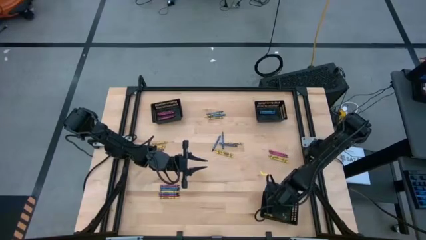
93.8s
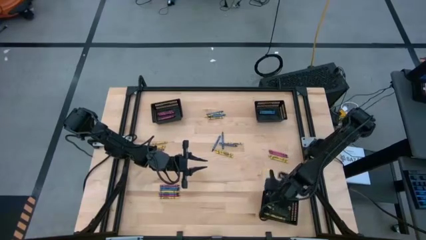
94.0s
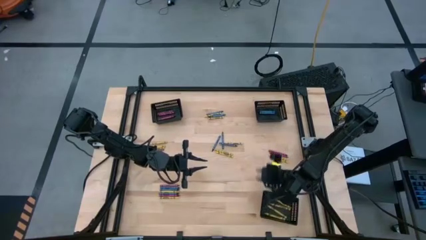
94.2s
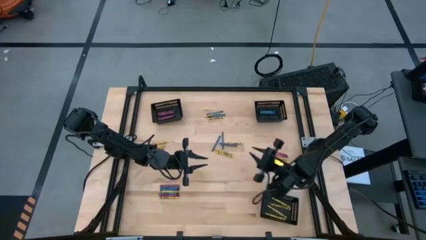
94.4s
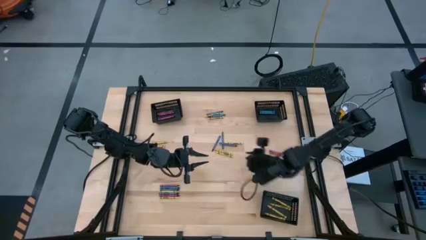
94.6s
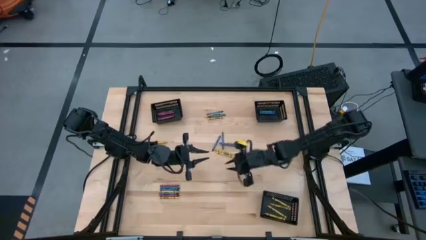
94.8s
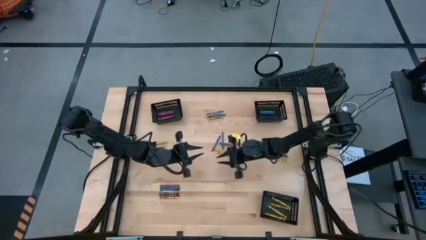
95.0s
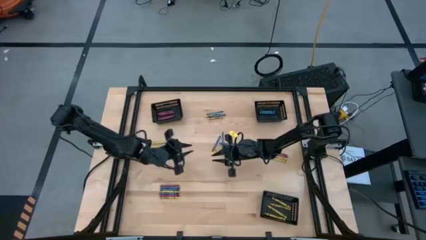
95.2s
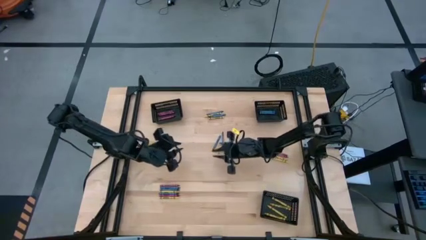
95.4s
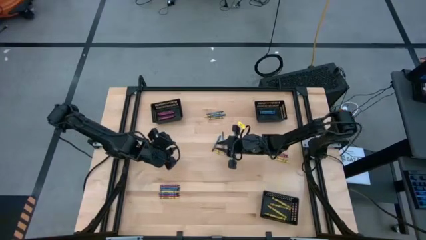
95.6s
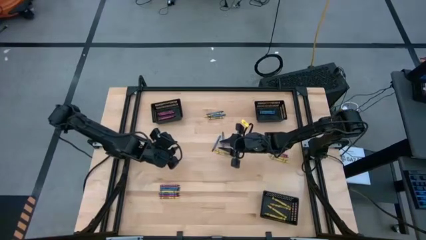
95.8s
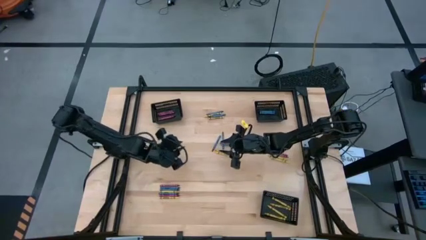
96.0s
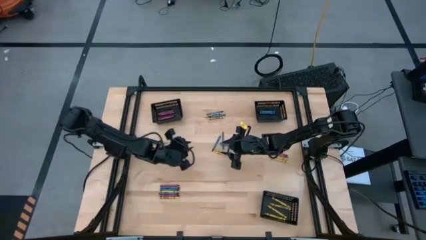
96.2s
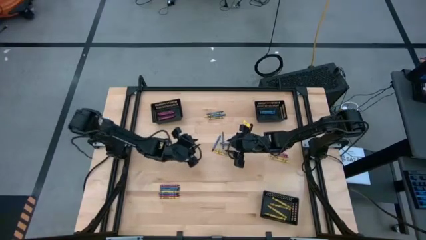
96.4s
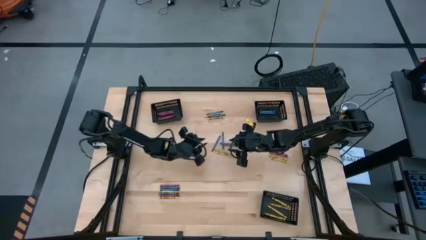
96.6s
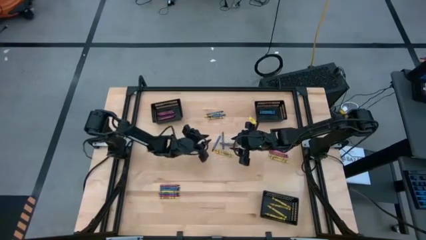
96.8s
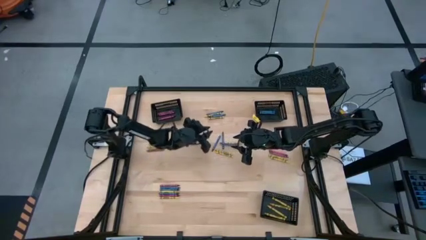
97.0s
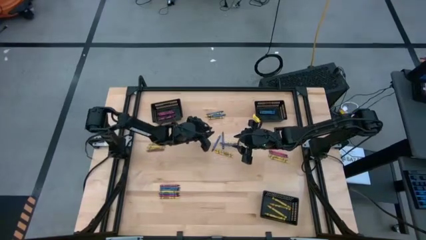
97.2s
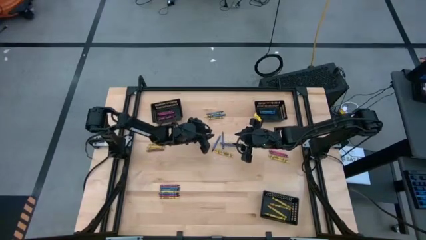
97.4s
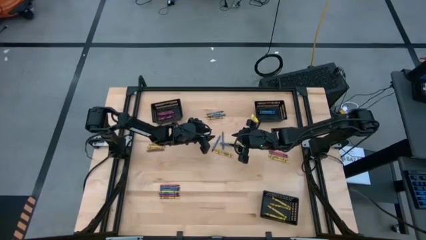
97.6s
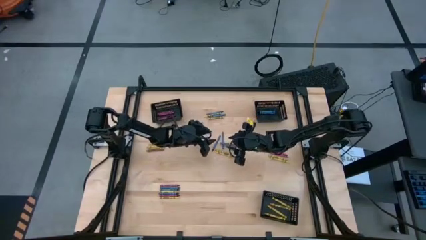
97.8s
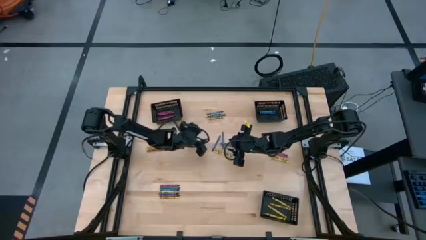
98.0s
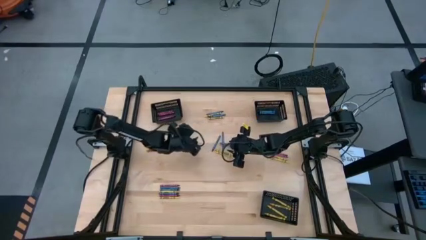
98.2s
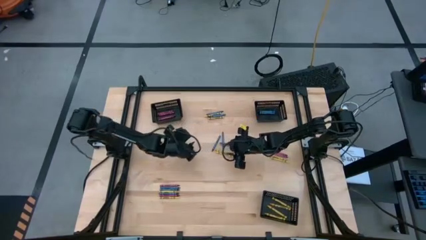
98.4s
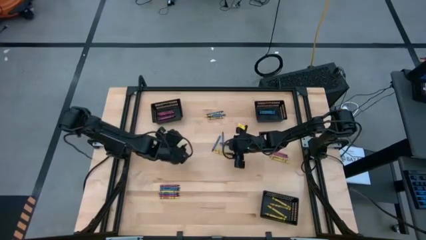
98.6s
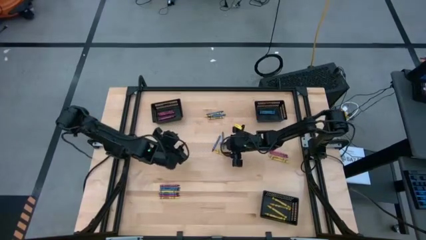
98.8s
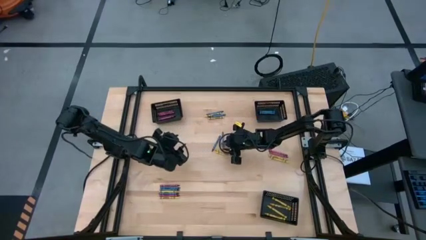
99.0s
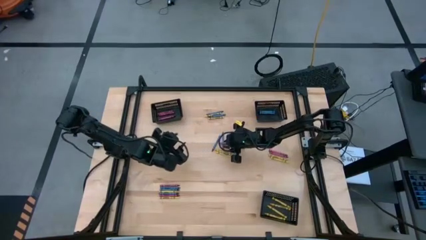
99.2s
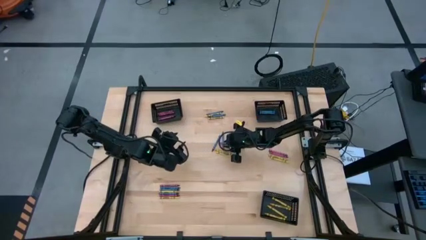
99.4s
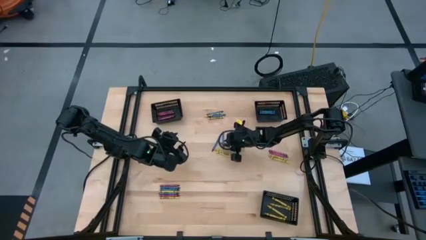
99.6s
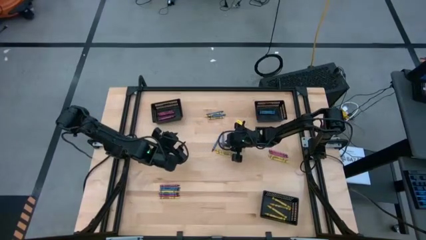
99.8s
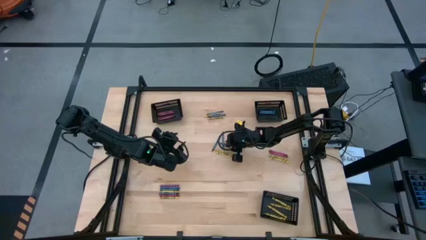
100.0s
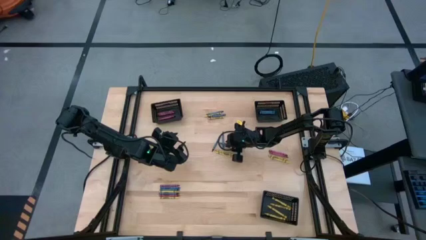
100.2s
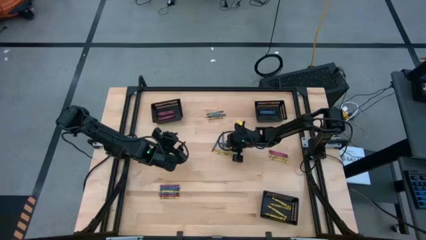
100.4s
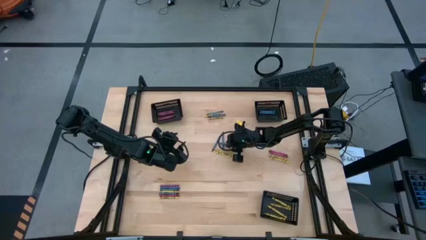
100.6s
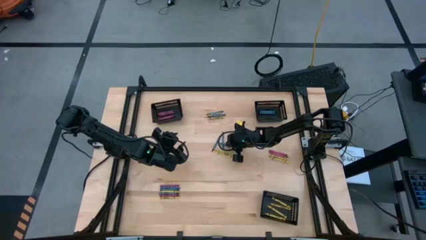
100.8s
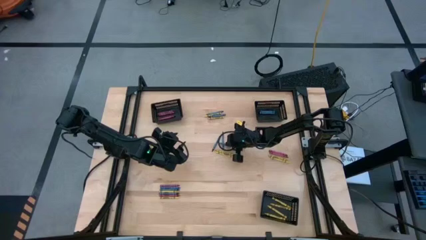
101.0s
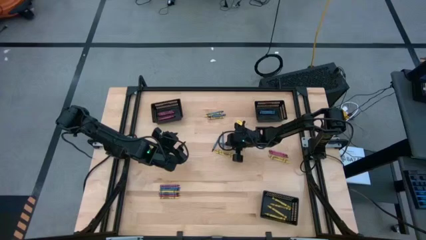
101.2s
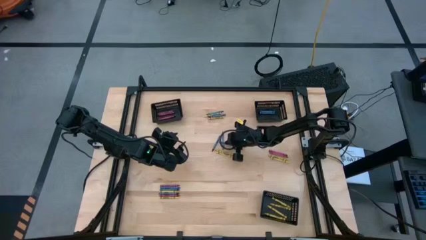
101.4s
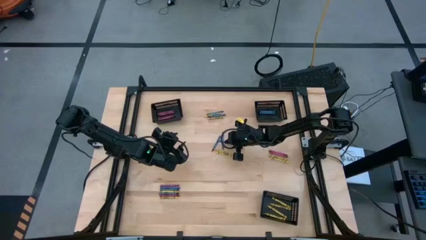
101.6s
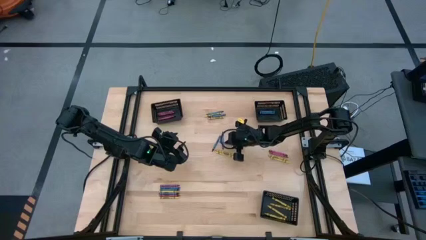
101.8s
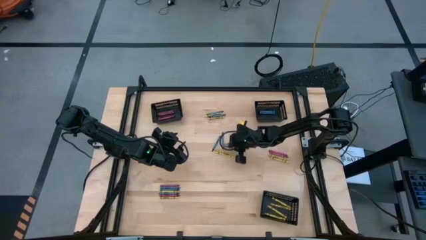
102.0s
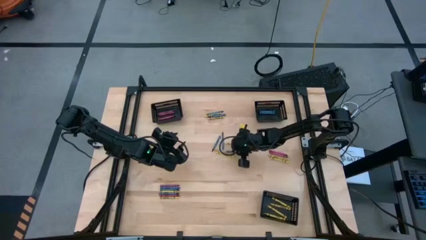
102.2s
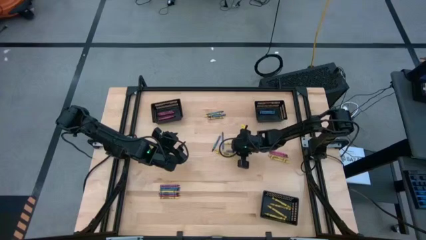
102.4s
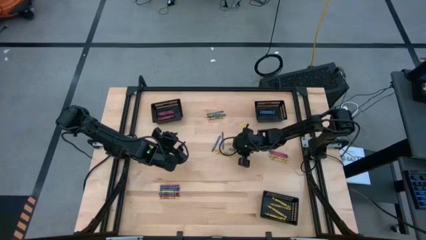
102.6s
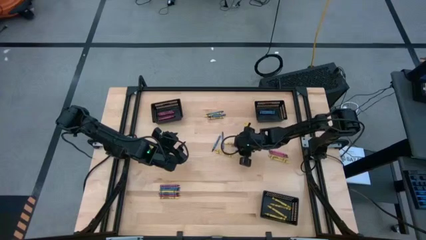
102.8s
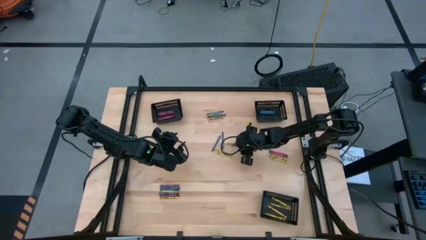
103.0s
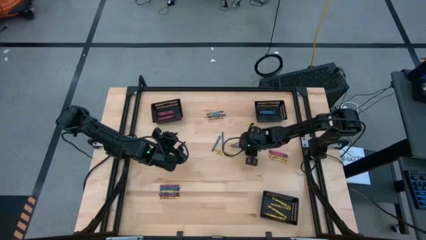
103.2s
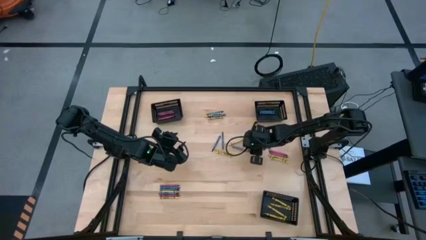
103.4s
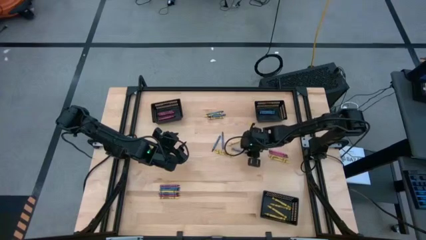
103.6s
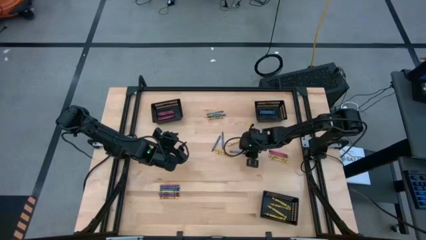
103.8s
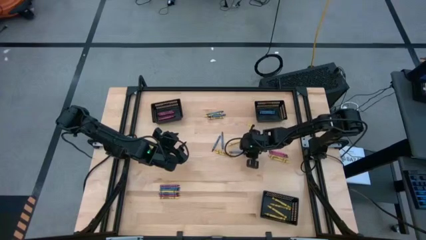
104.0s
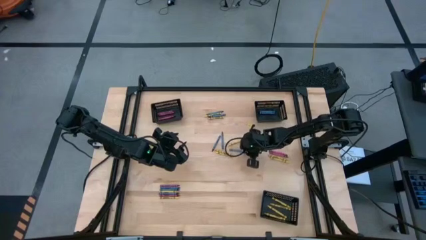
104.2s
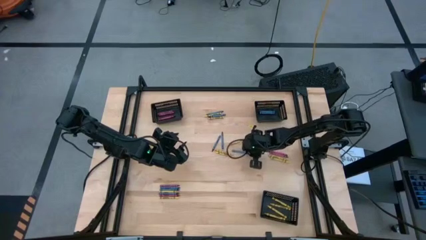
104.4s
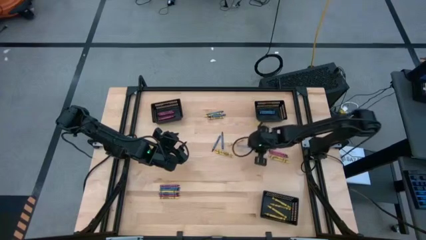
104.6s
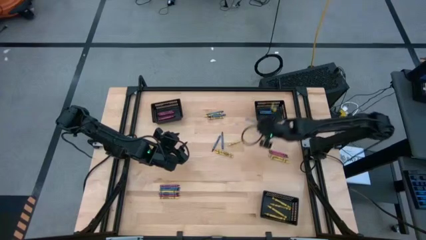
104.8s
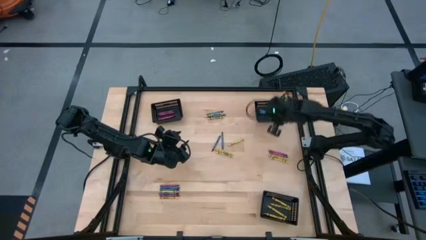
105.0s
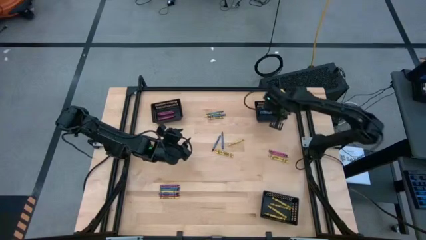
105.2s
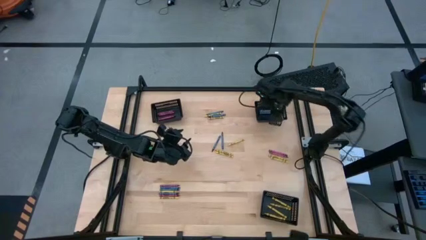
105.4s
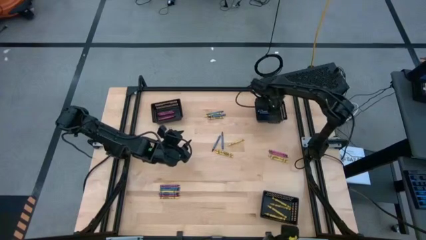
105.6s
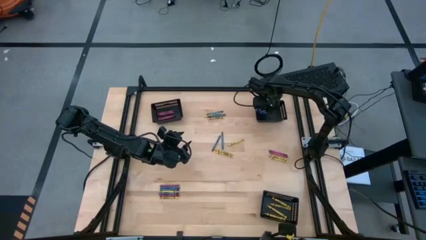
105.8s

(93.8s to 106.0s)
Task: Sort crayons
Put the blue crayon into the top right black bin
